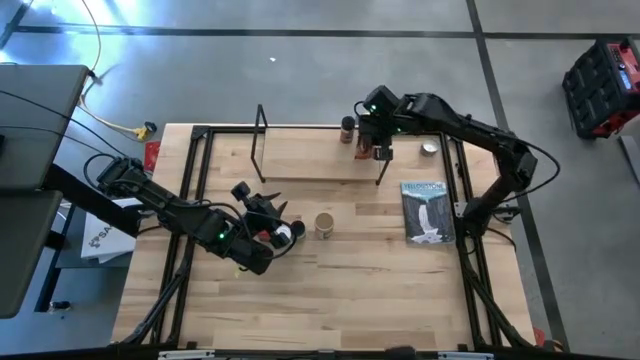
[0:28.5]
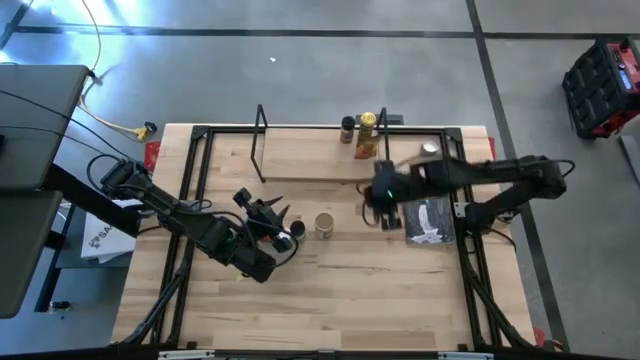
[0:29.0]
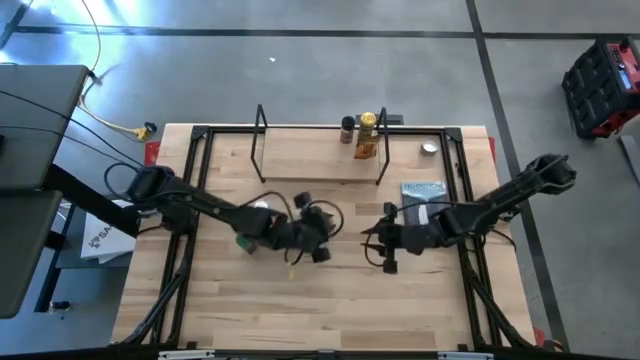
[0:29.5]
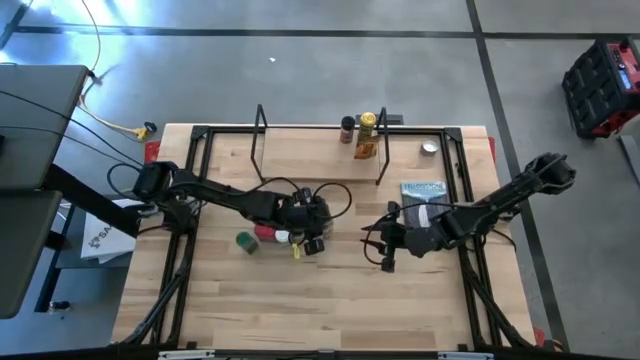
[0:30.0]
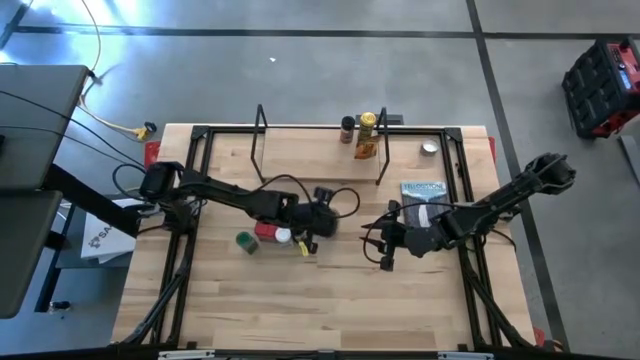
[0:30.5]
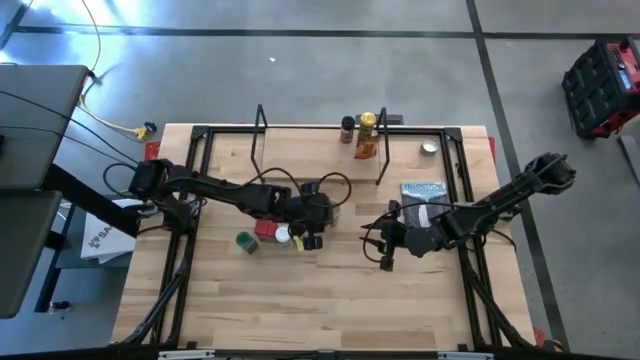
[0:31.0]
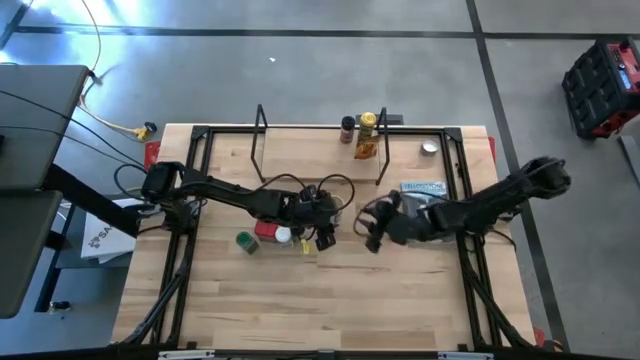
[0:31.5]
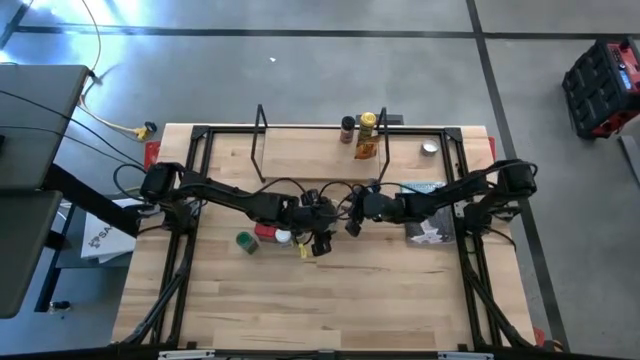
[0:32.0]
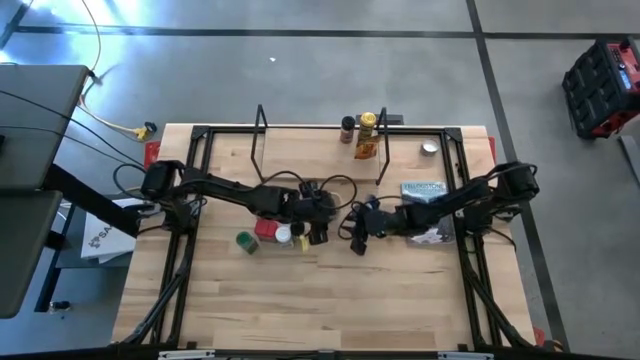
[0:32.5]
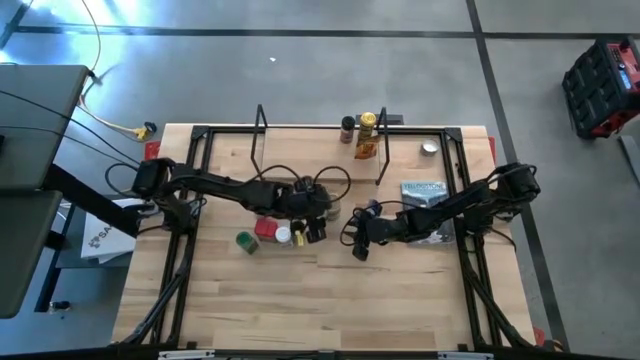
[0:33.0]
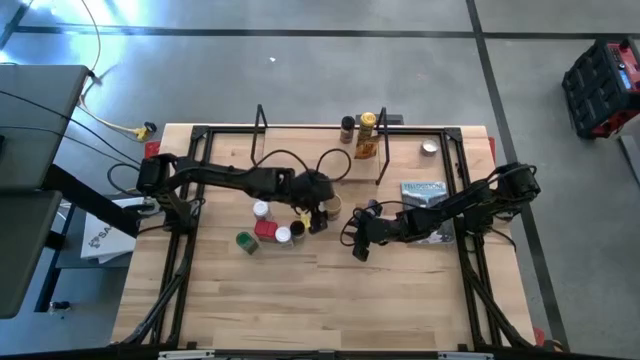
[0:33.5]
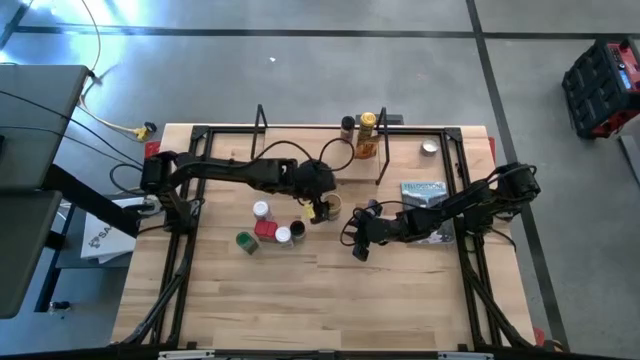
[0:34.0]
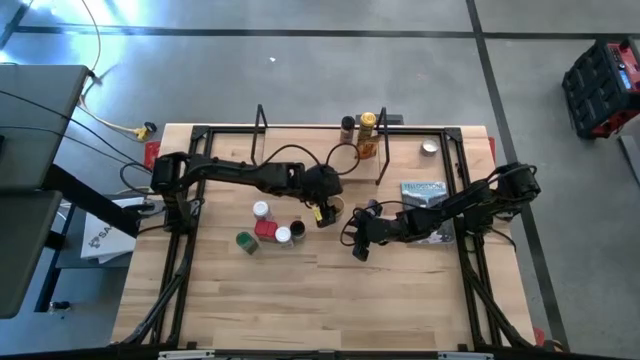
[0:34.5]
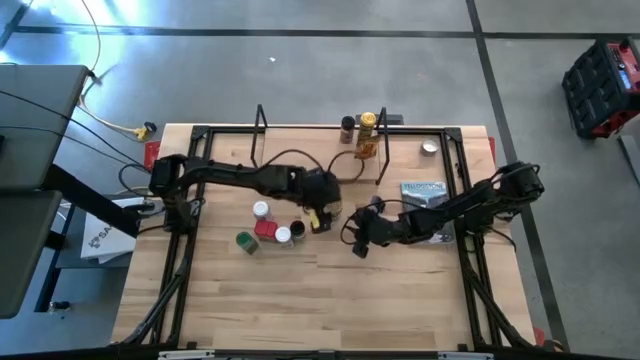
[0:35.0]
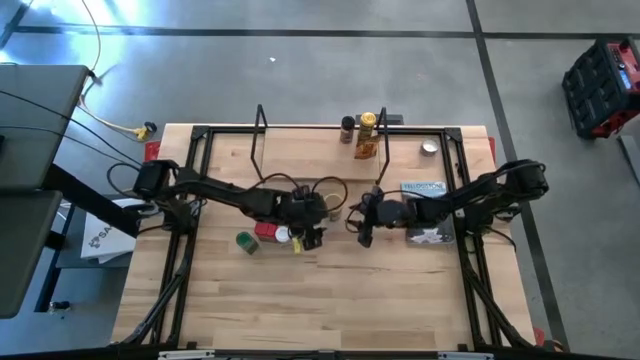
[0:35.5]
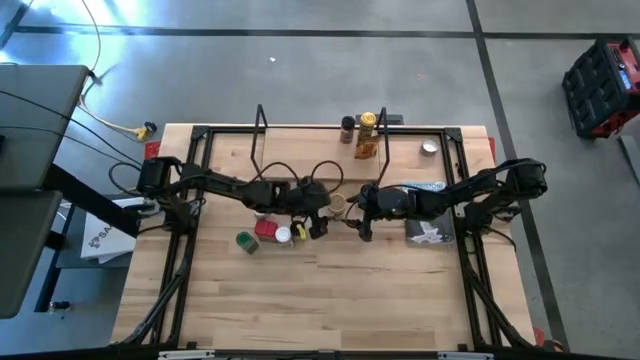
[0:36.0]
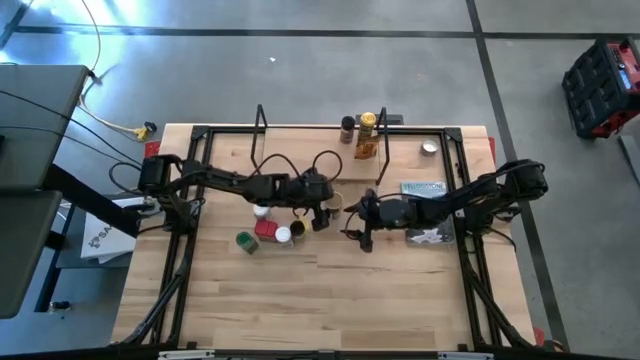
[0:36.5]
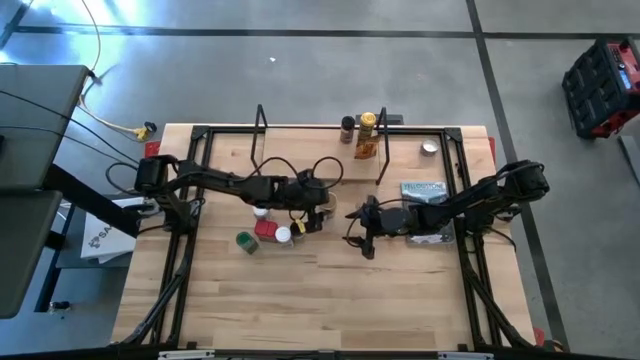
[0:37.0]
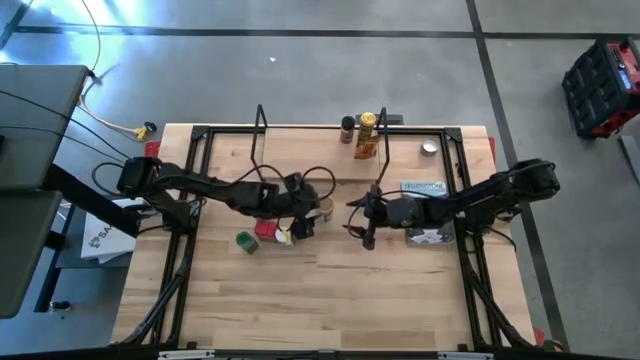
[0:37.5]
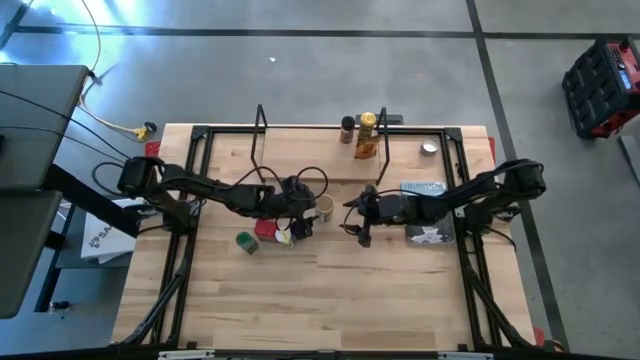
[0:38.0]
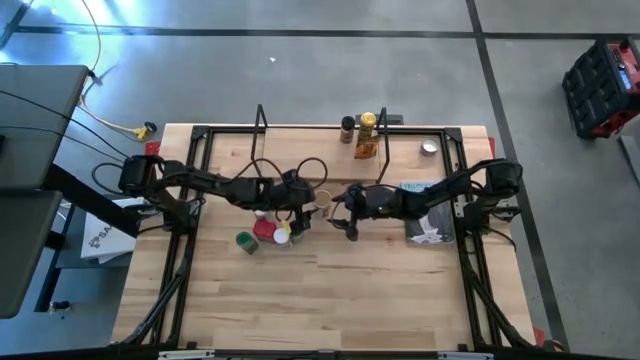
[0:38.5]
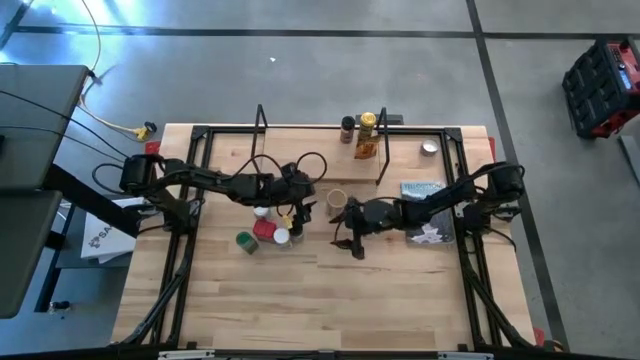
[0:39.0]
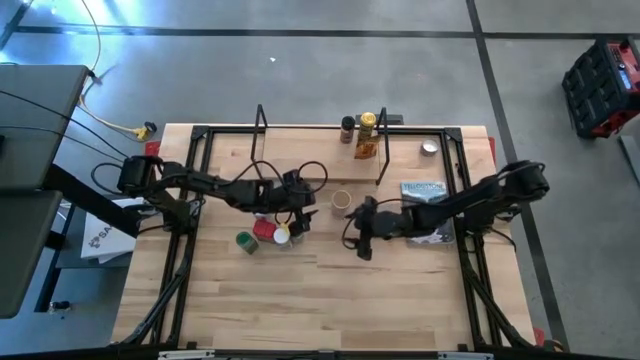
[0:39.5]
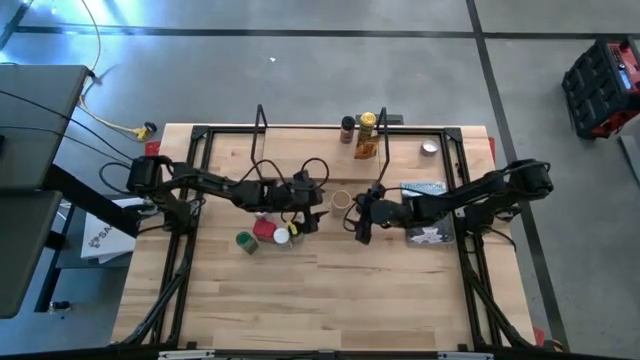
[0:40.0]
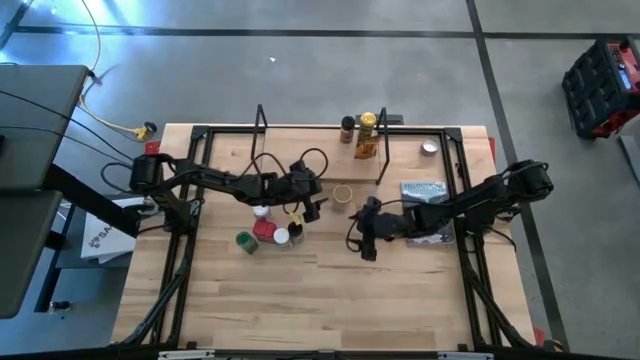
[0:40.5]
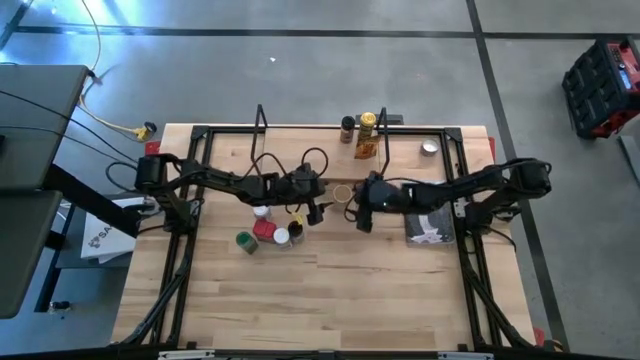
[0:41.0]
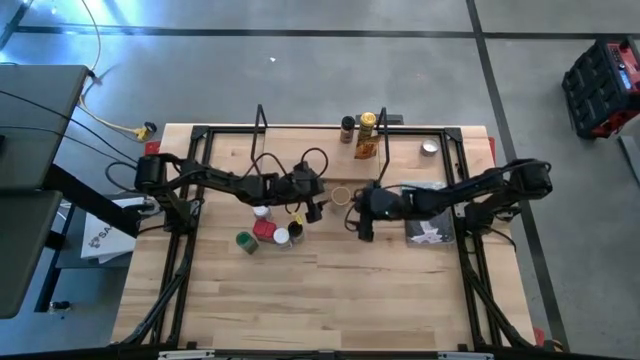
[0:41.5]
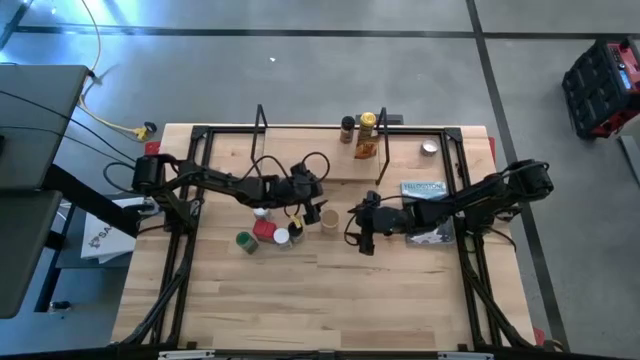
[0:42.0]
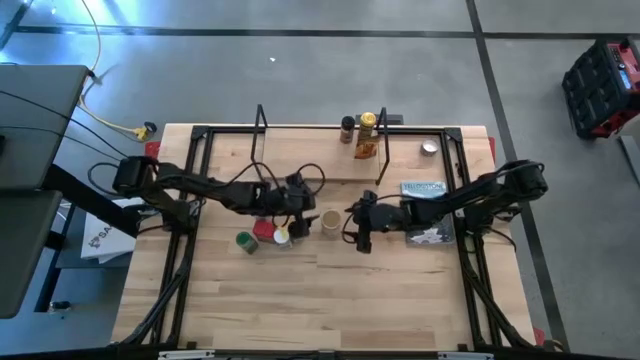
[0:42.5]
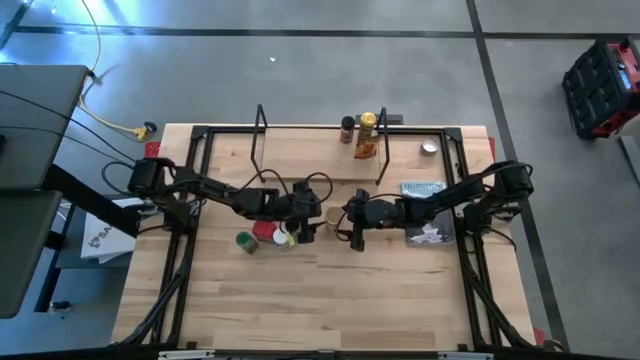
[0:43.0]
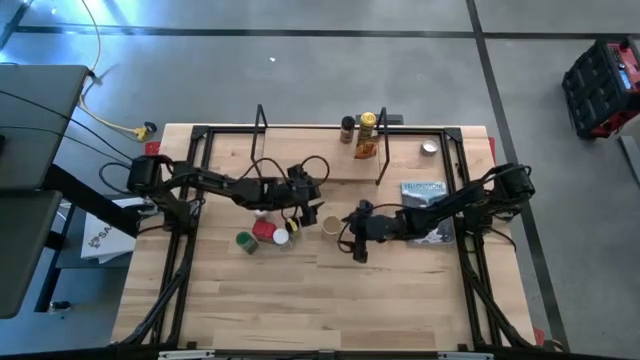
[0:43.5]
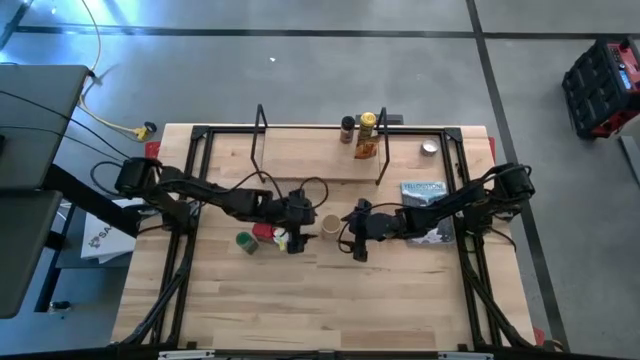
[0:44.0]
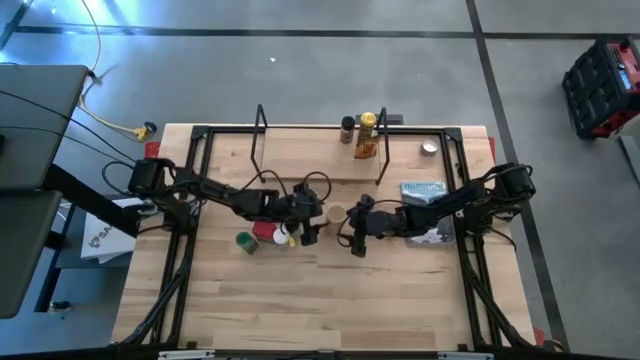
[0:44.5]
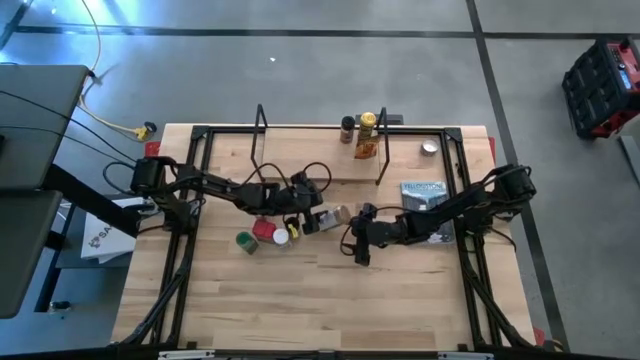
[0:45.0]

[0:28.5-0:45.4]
Task: Shelf spices
Put the gold seasoning bottle on the shelf
